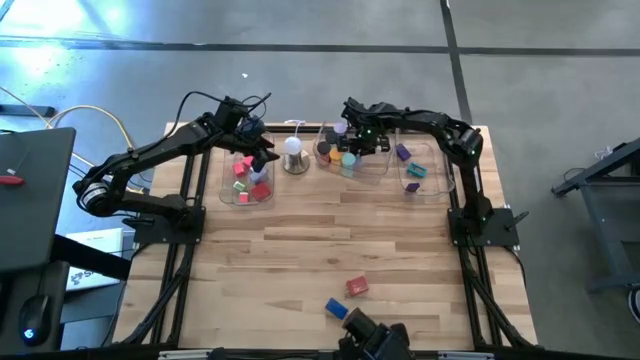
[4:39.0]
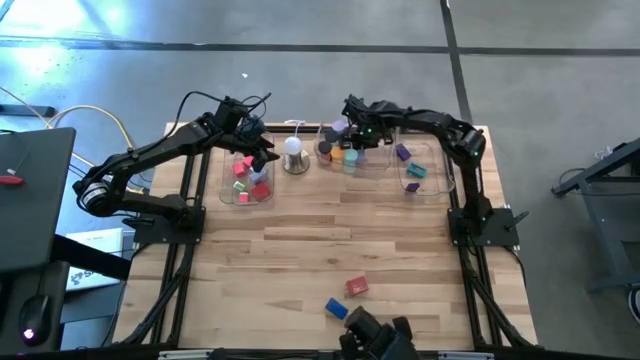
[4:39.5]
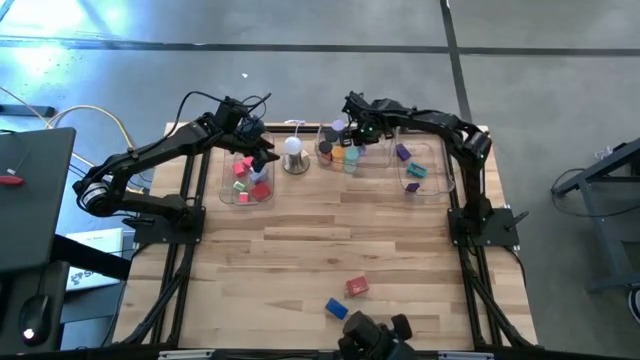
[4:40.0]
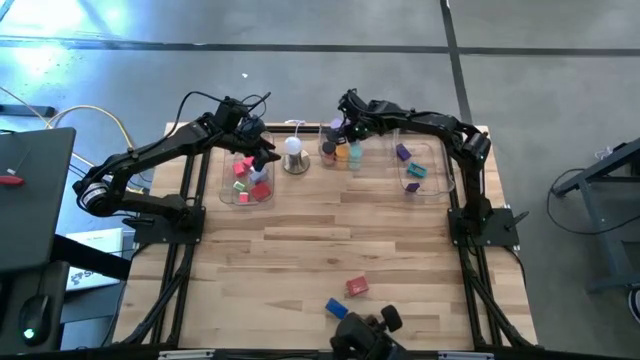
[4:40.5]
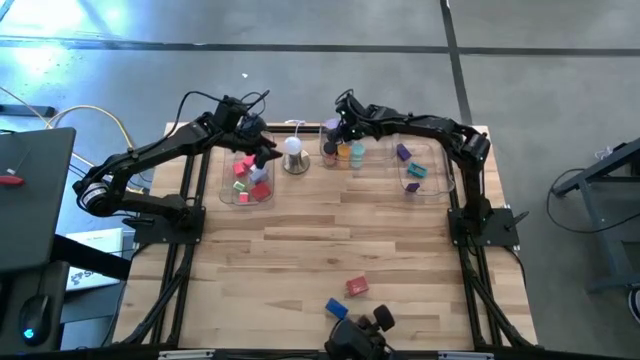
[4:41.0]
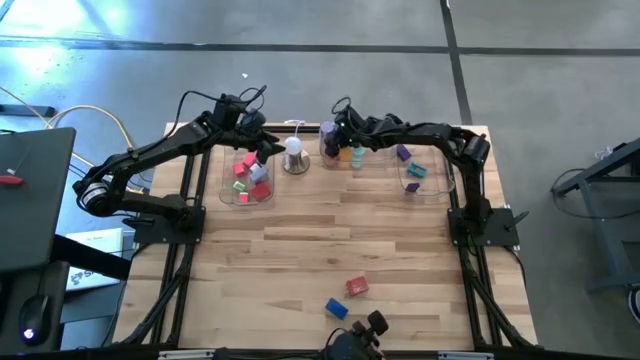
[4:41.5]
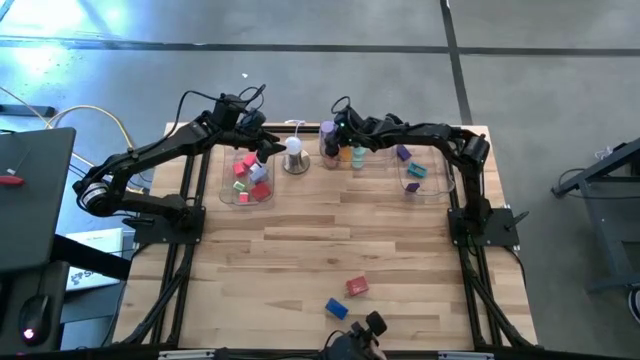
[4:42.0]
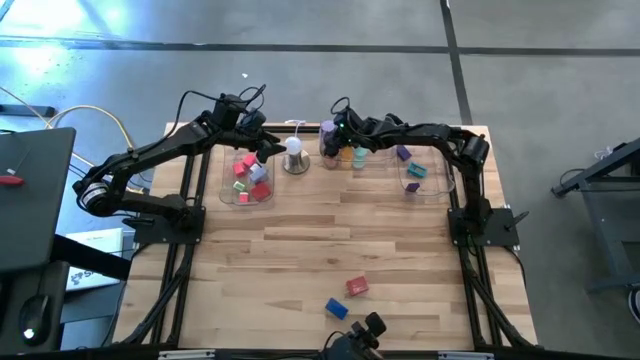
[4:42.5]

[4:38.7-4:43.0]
Task: Pick & Place Office items
Put the purple hourglass into the middle transparent bin

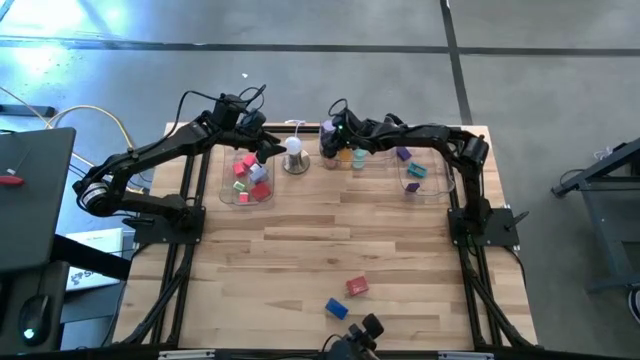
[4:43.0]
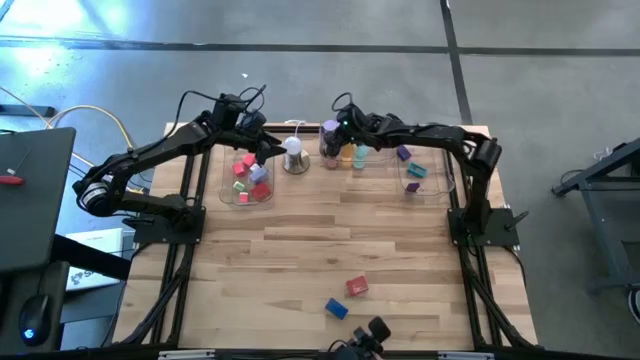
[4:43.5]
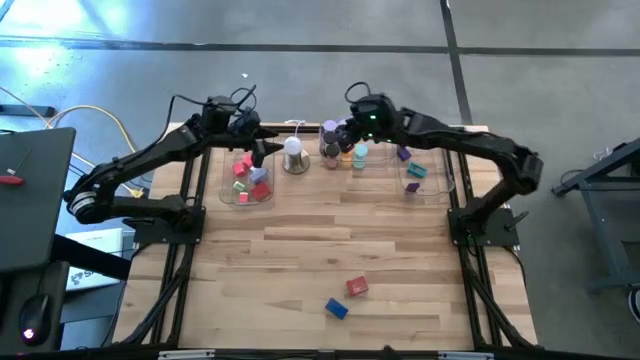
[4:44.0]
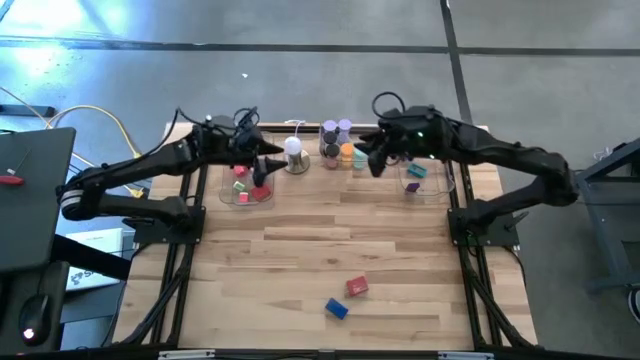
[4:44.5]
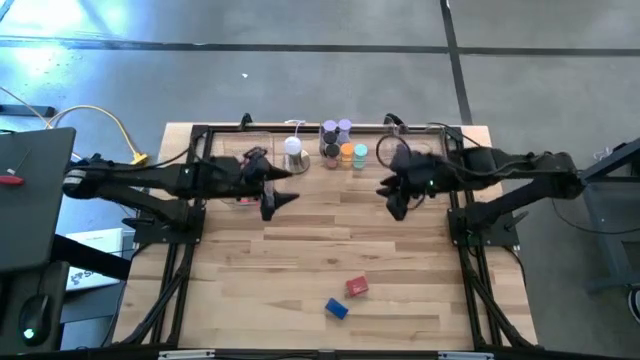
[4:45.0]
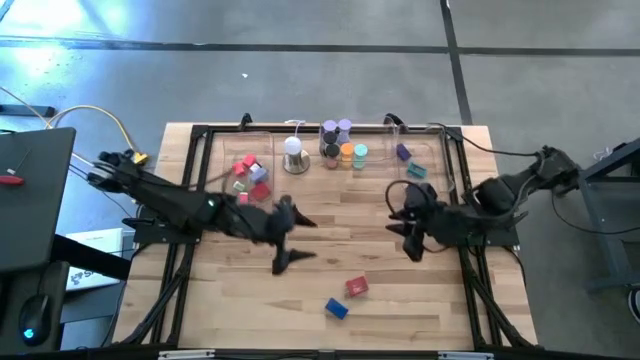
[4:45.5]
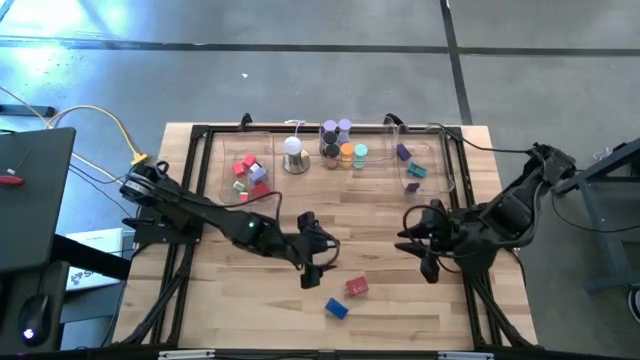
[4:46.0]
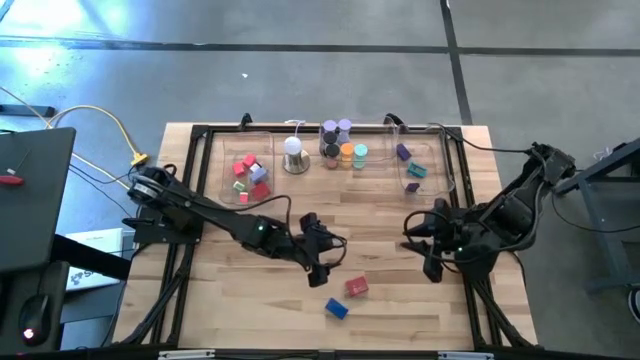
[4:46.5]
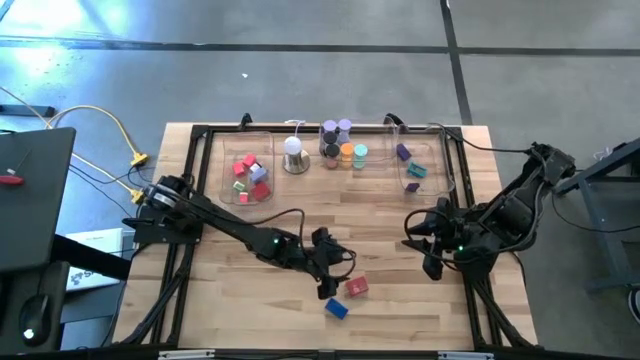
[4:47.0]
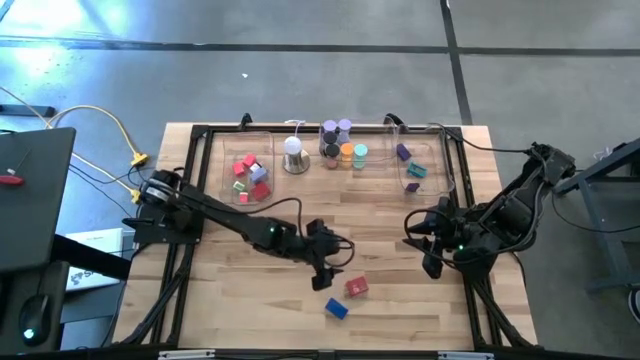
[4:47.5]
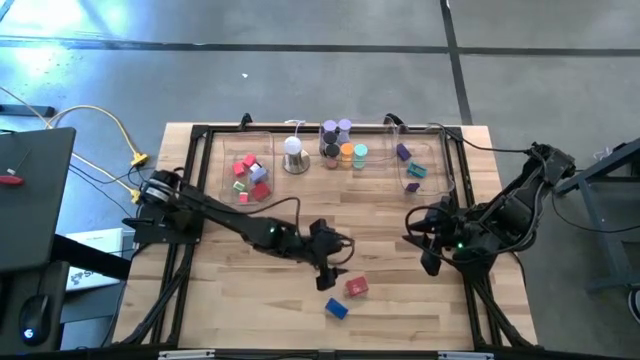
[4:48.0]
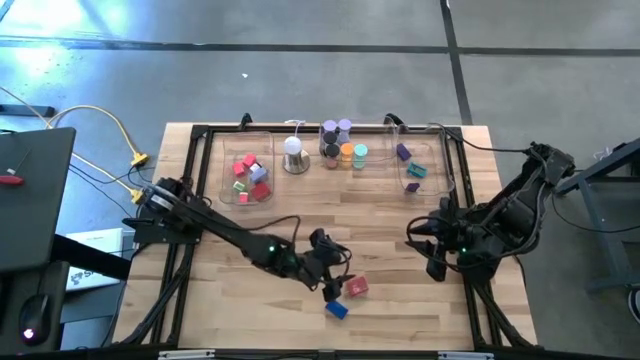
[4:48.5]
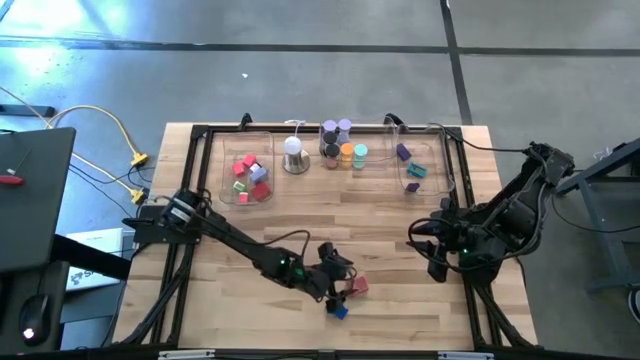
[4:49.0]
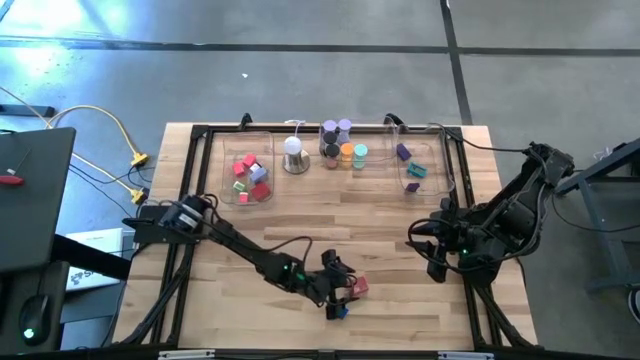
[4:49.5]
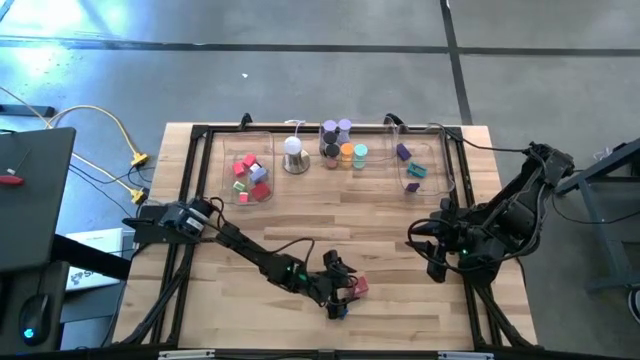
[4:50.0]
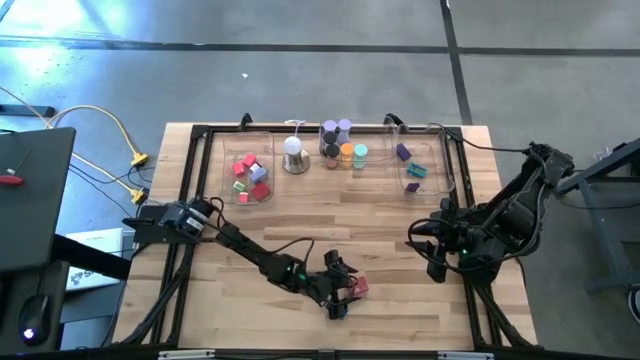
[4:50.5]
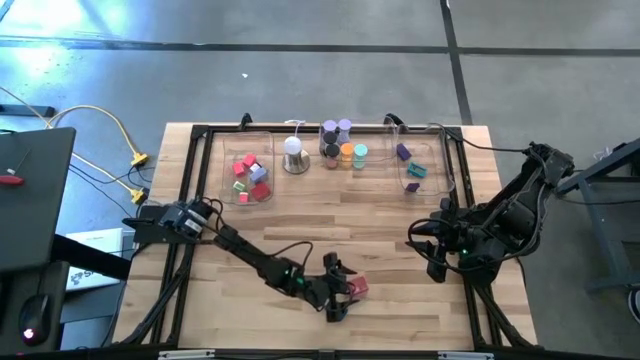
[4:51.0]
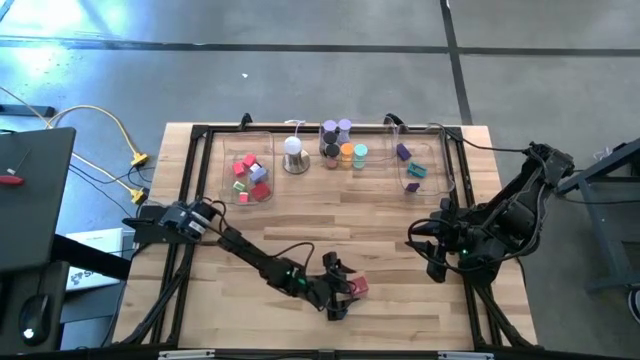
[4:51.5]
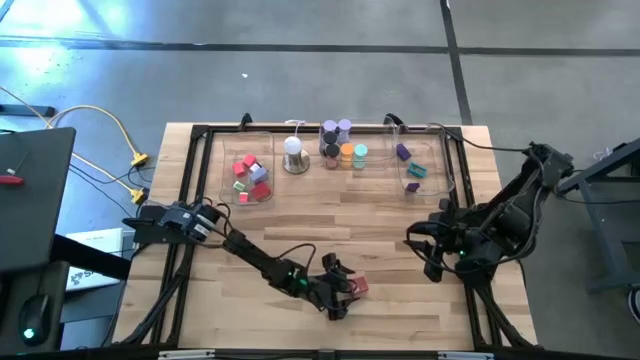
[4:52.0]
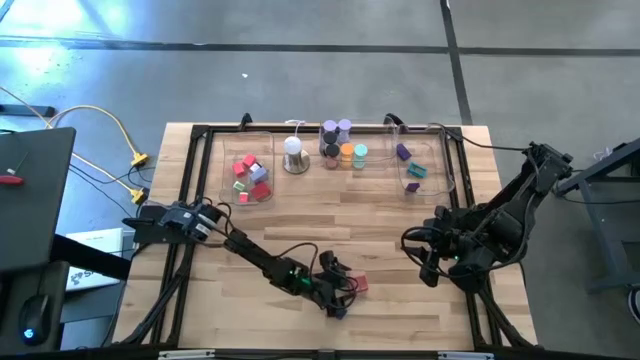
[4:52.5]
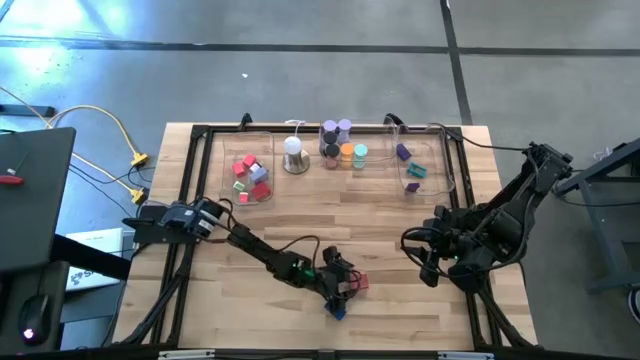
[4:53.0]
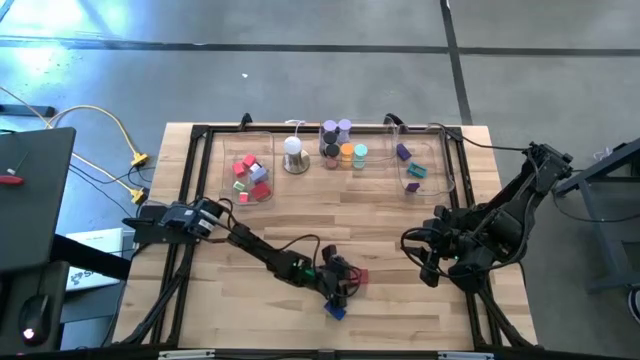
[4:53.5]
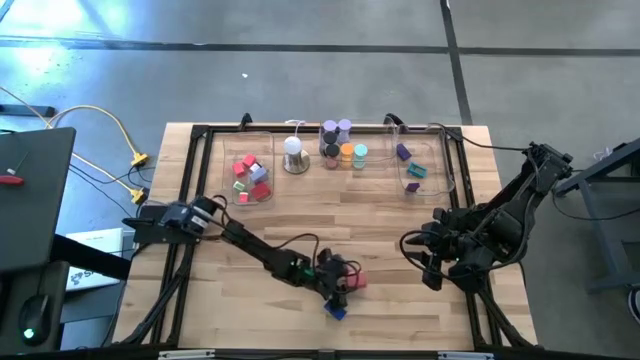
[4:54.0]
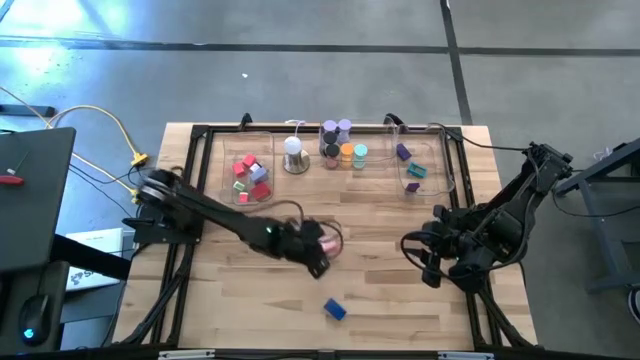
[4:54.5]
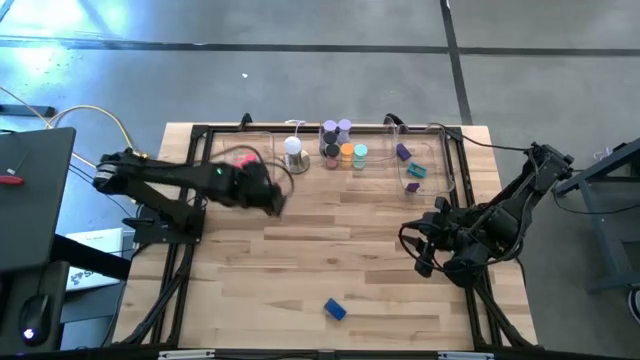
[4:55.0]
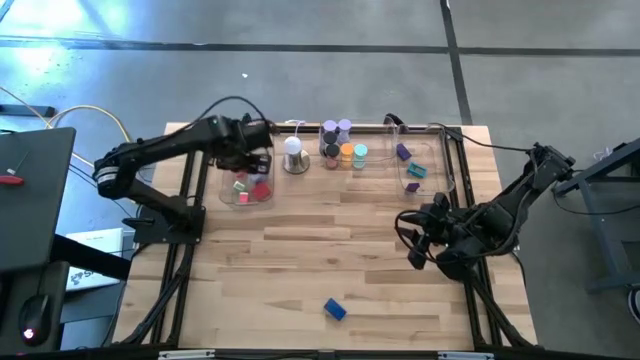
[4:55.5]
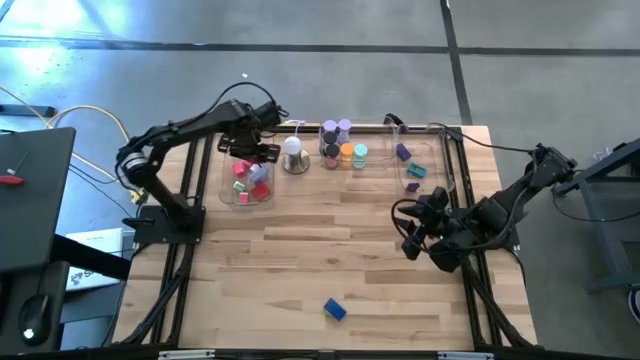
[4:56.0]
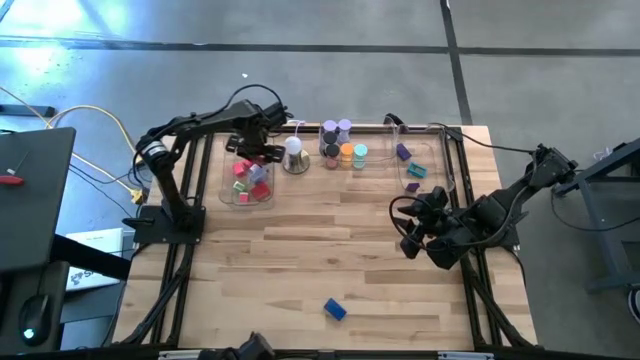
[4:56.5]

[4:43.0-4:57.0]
Put the red adaptor into the left transparent bin

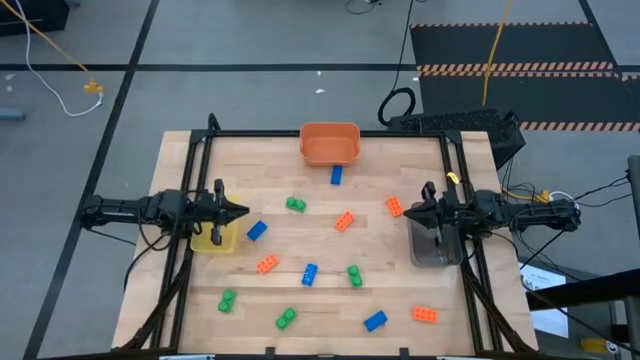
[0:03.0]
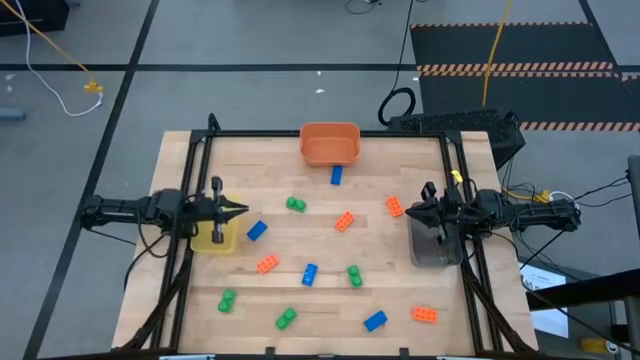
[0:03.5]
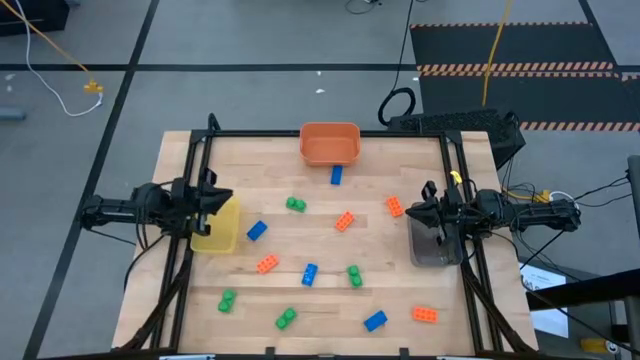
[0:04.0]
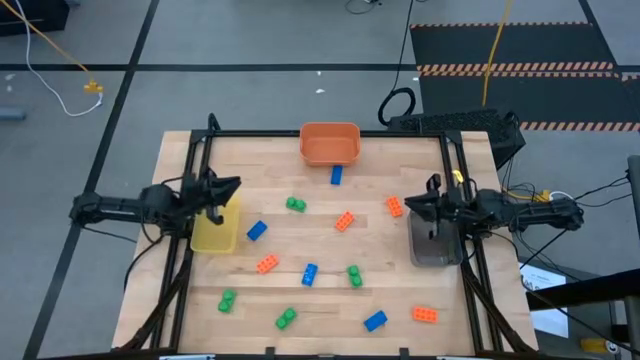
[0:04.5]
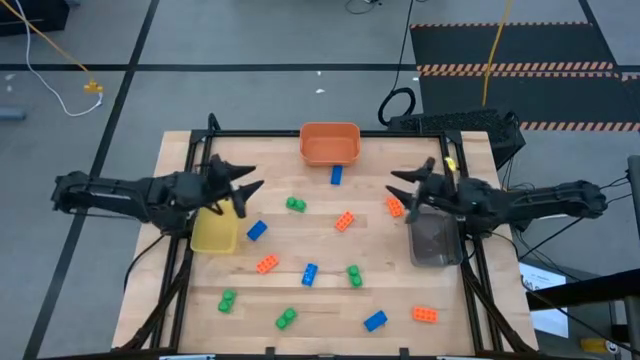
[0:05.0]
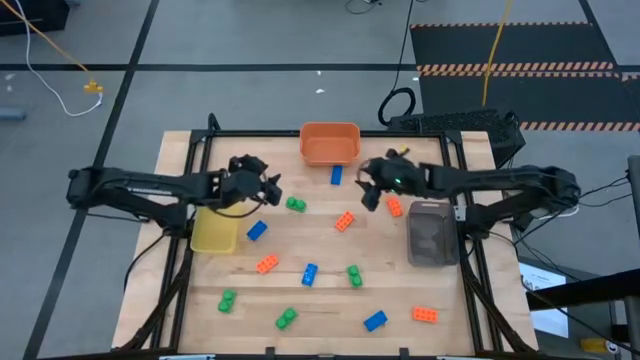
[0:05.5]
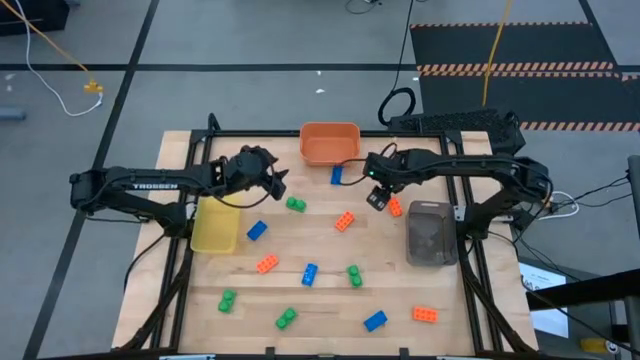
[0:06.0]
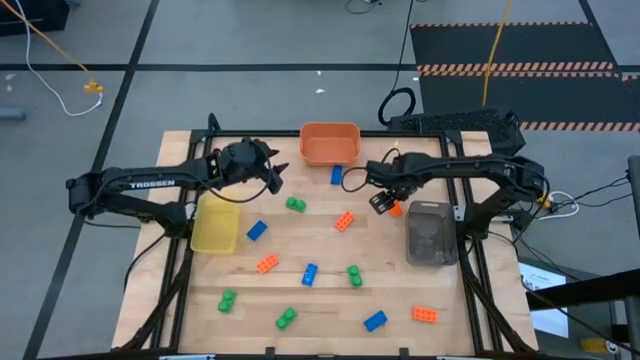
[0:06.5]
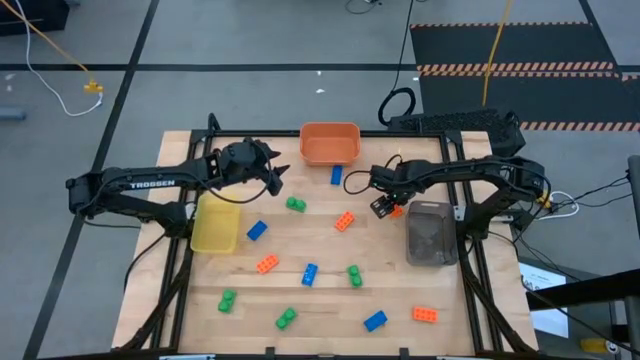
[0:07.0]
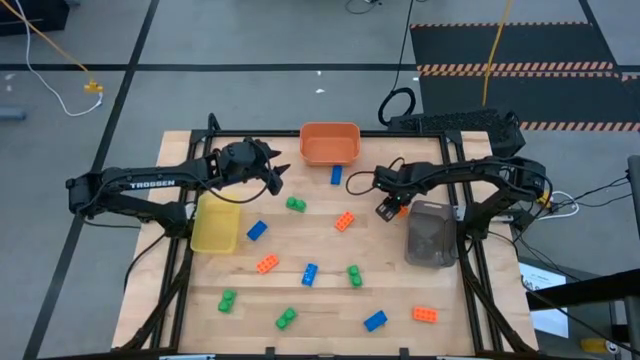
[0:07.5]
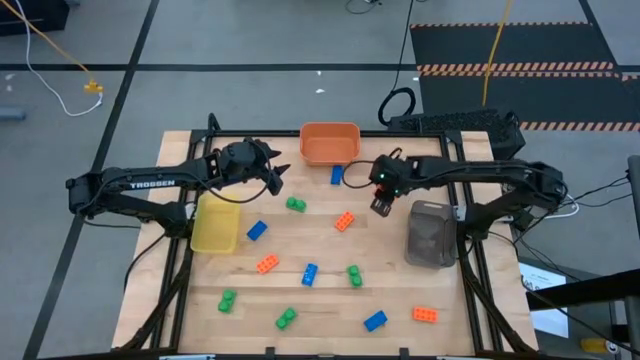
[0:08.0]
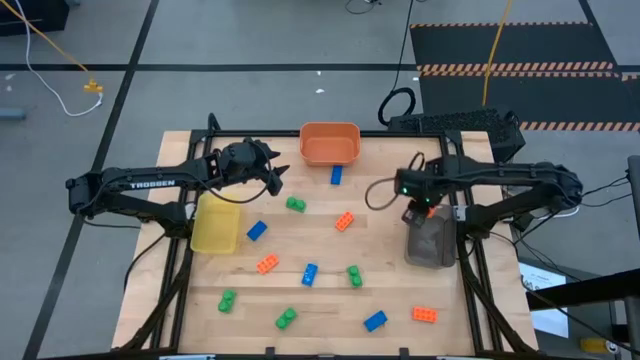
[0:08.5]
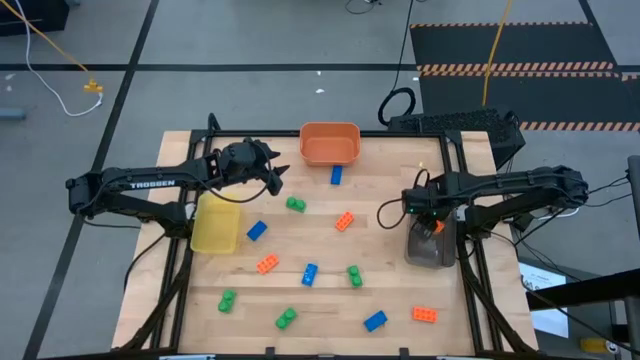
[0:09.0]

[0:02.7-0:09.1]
Task: Sort & place blocks by color
Put the orange game piece into the black bin
